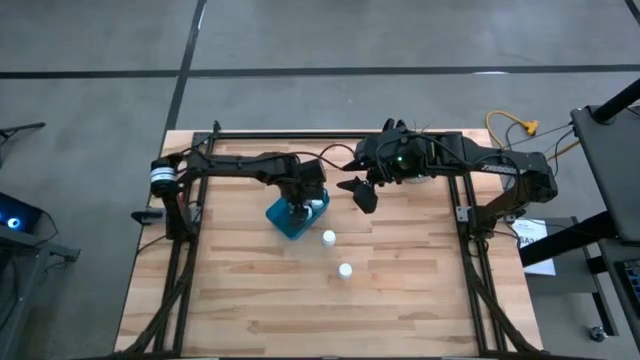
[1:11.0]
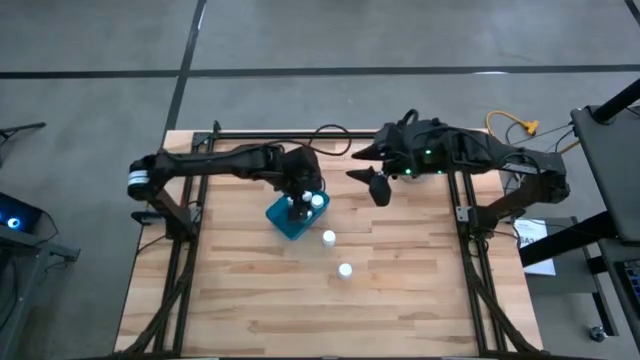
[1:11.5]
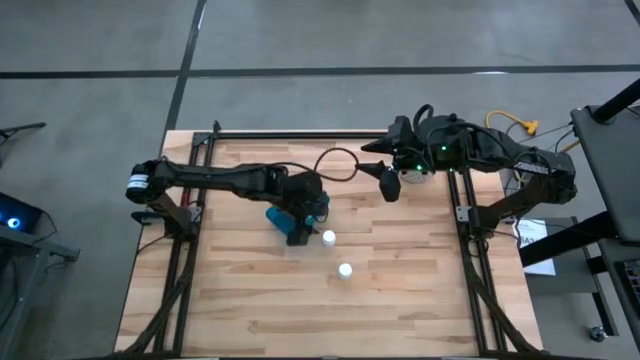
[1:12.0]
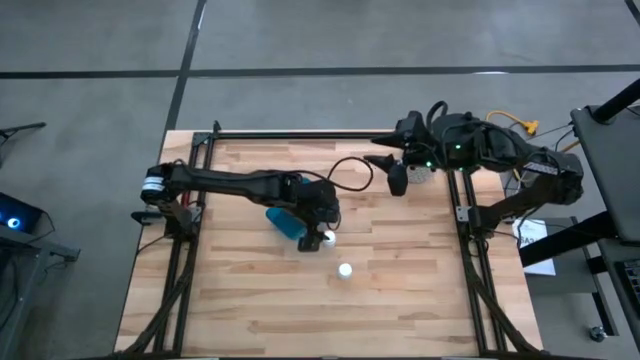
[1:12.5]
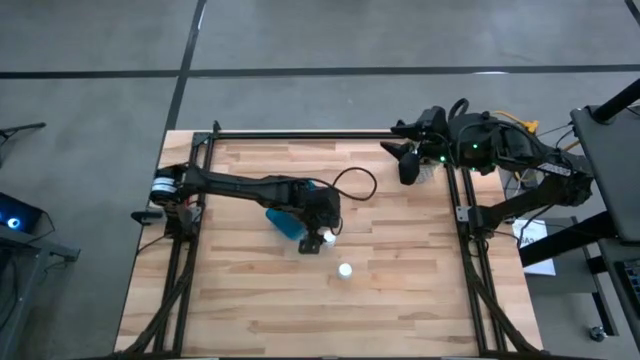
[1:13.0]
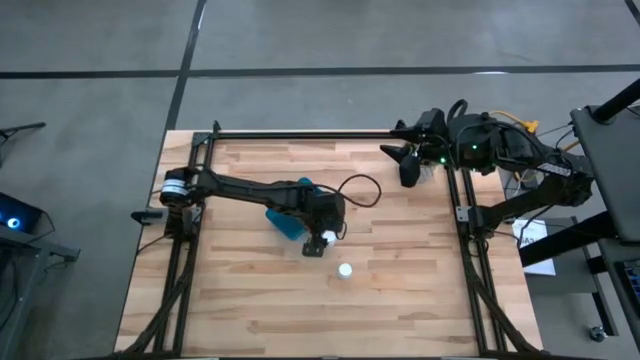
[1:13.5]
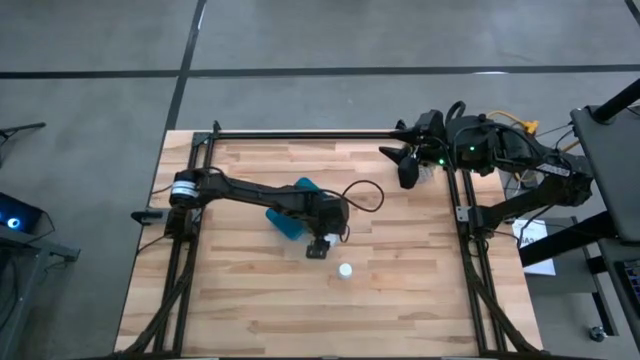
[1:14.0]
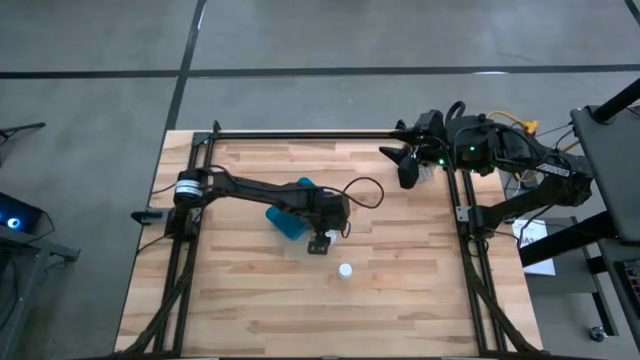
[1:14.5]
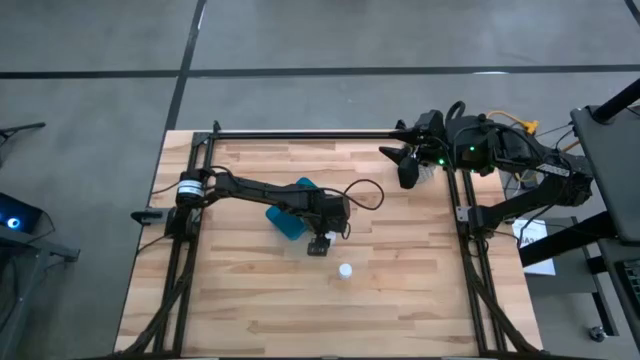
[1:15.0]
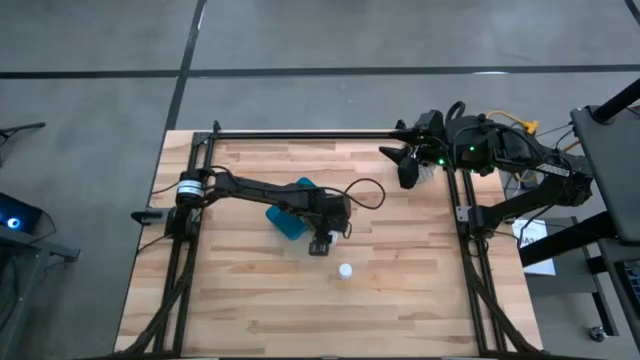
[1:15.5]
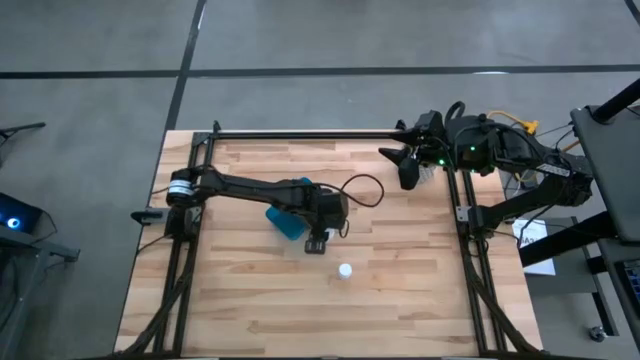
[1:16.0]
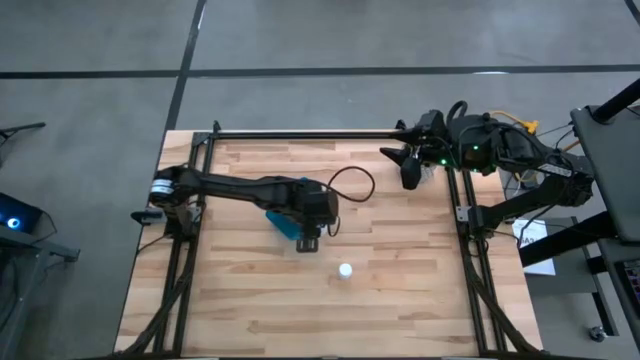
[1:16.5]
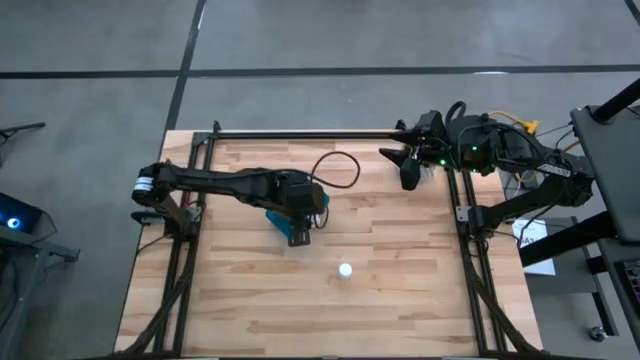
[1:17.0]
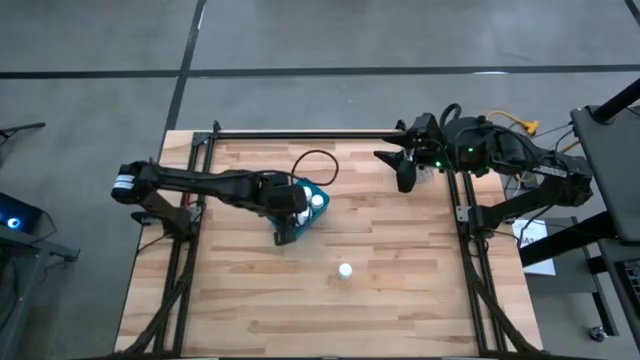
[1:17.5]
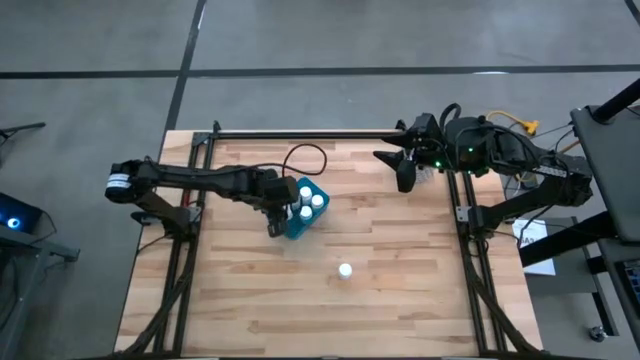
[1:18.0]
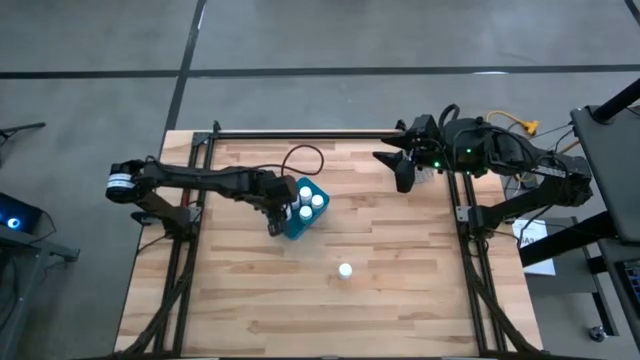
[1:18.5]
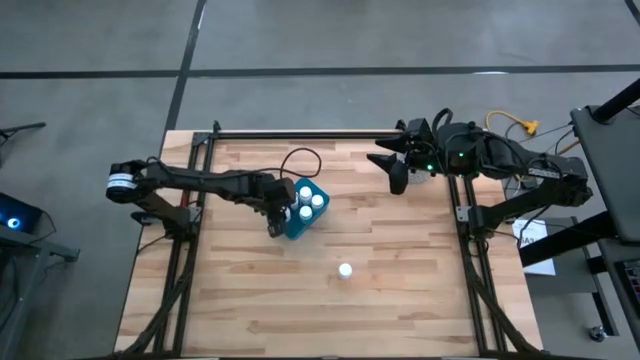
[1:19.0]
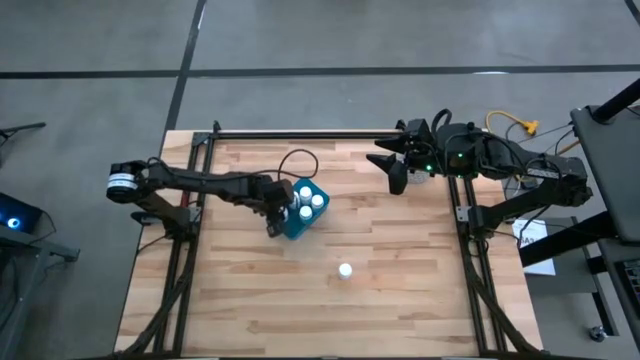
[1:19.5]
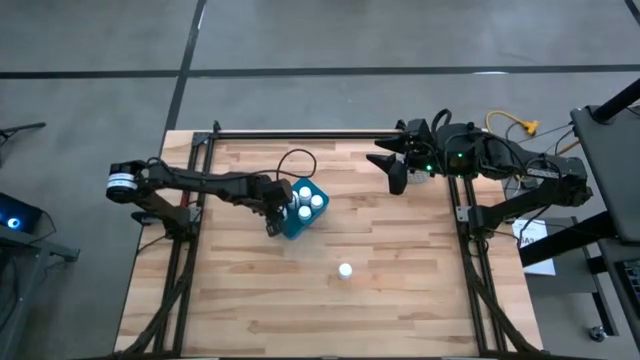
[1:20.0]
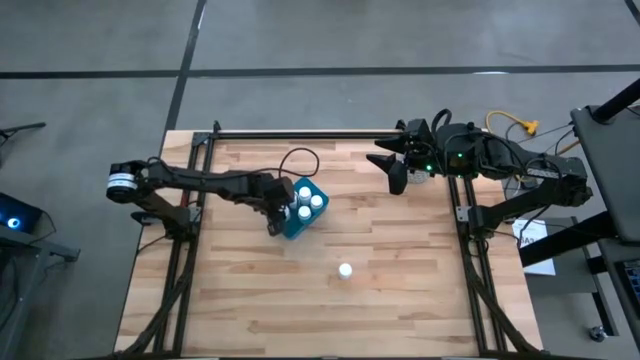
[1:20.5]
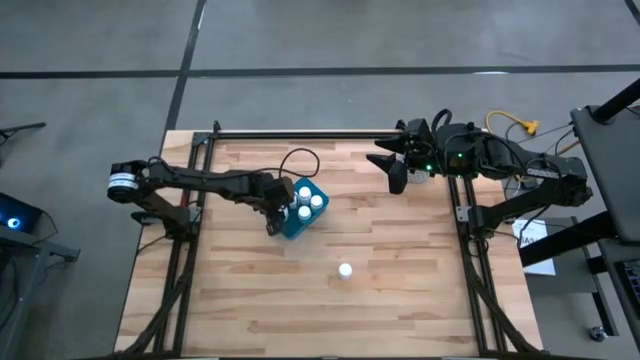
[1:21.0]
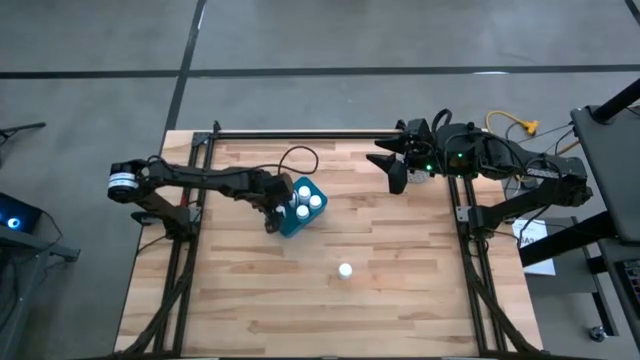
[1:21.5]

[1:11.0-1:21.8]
Task: Pick and place pill bottles into a basket
Put the top white pill bottle into the blue container

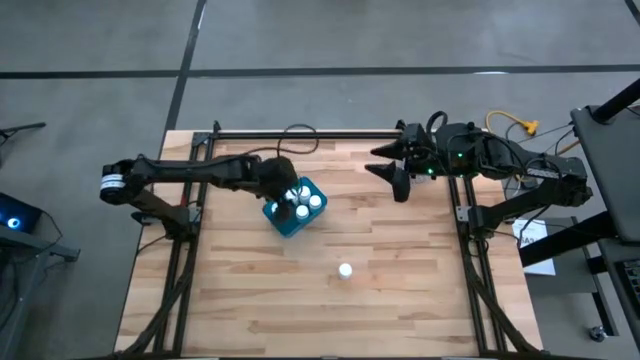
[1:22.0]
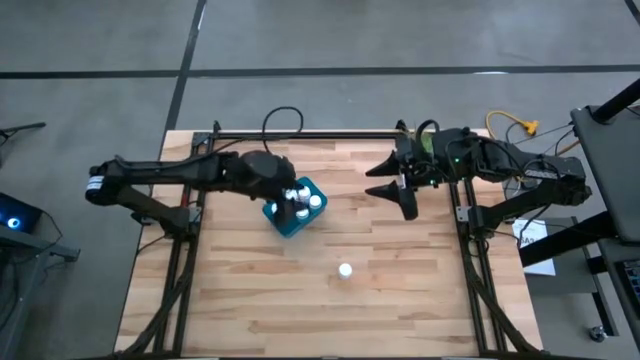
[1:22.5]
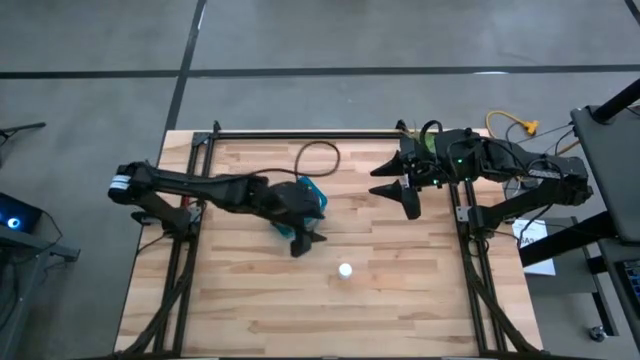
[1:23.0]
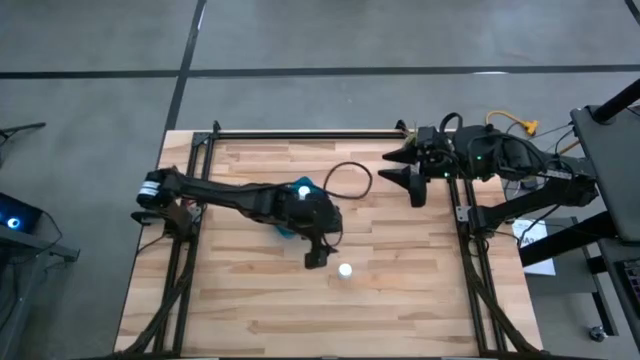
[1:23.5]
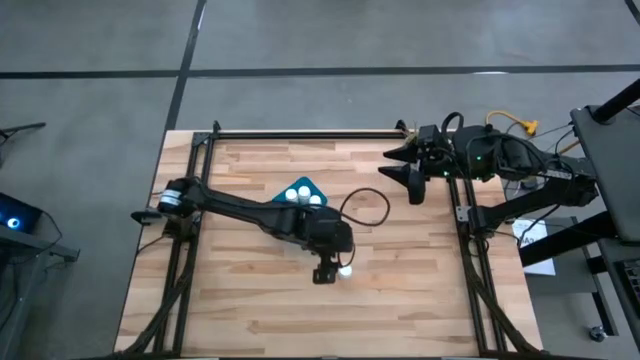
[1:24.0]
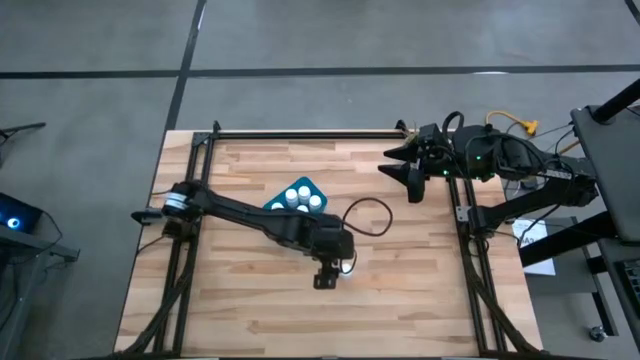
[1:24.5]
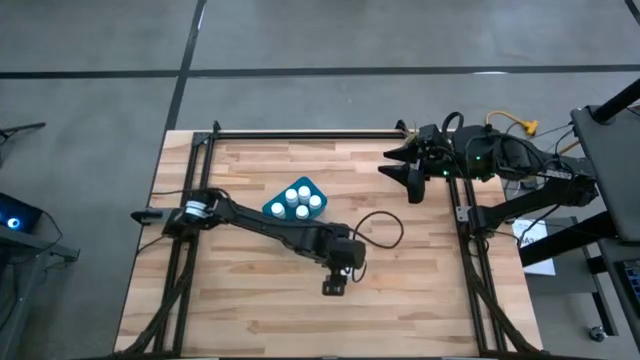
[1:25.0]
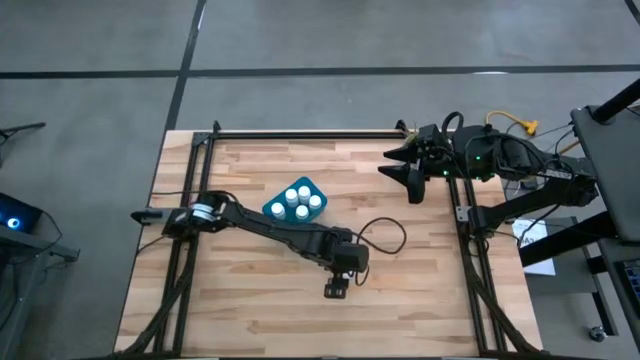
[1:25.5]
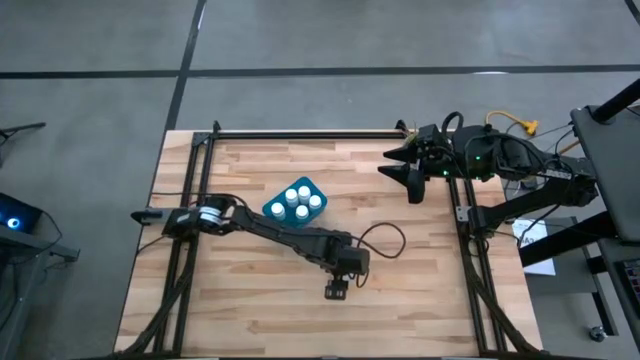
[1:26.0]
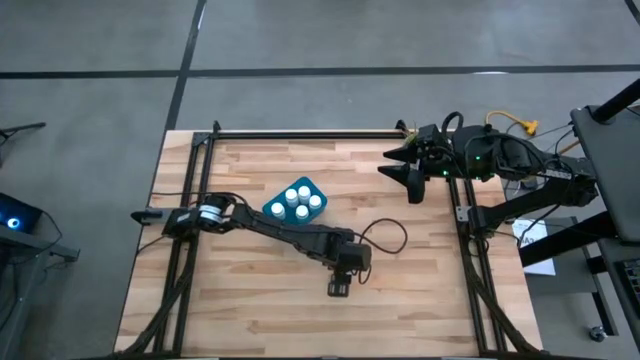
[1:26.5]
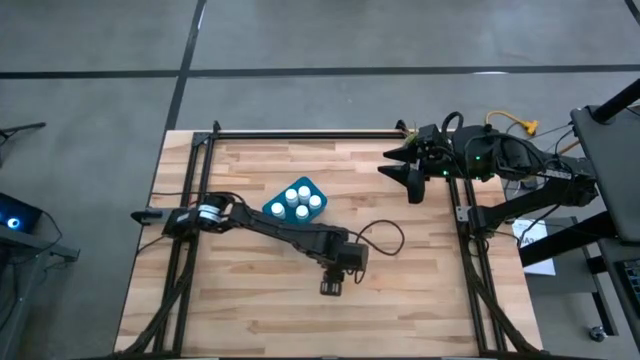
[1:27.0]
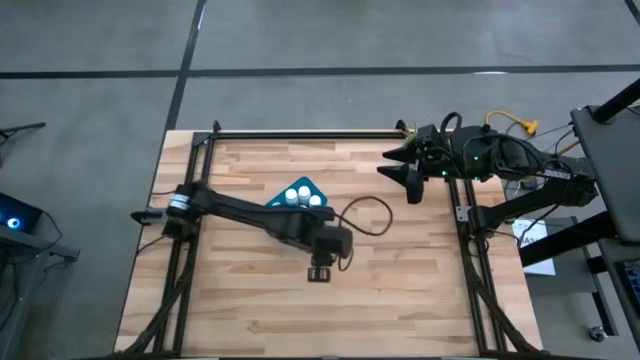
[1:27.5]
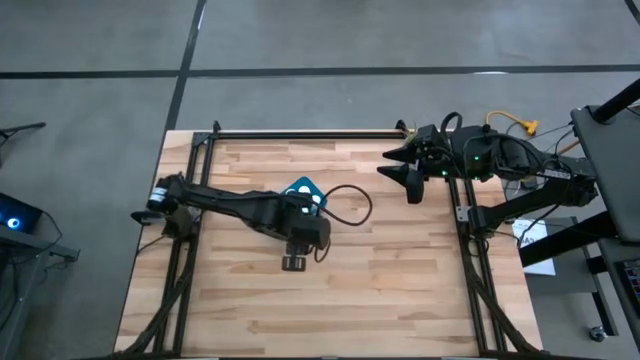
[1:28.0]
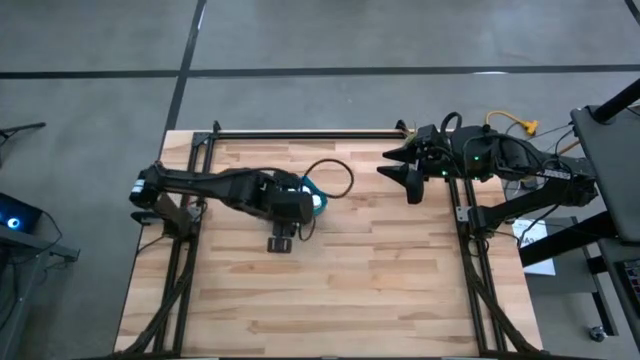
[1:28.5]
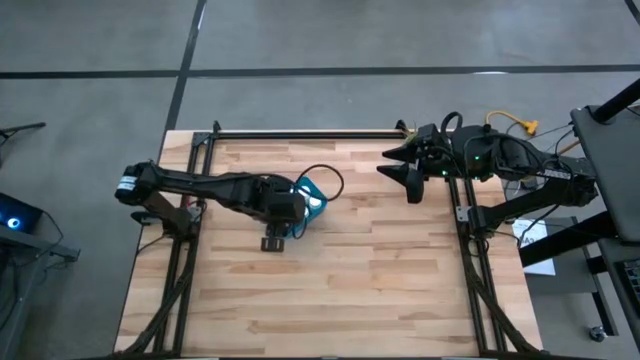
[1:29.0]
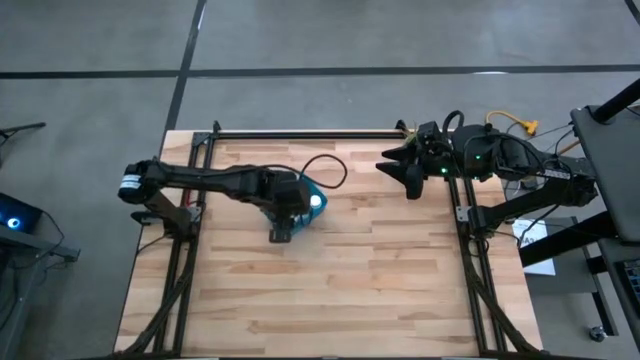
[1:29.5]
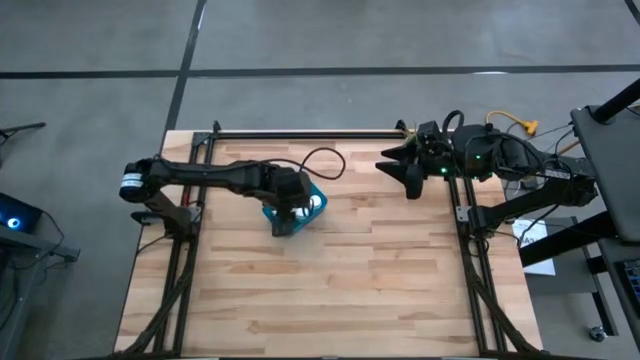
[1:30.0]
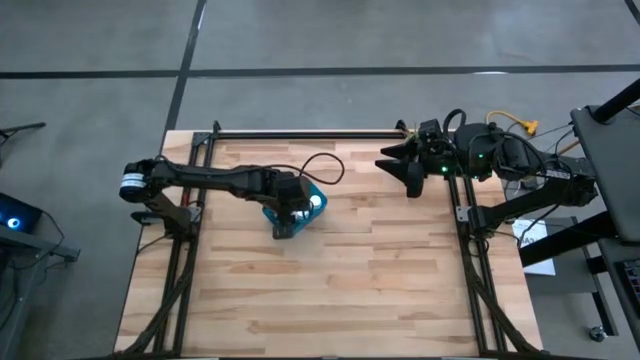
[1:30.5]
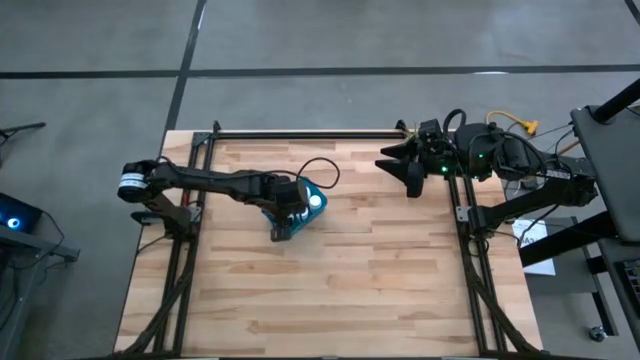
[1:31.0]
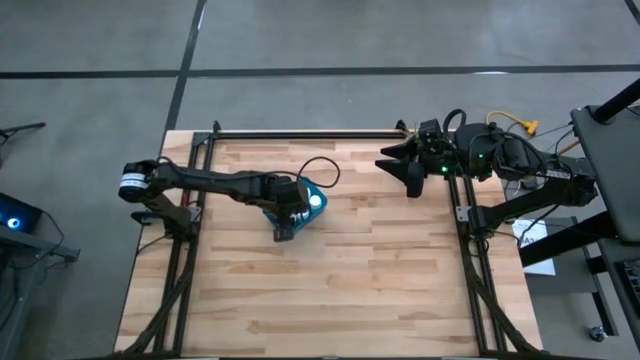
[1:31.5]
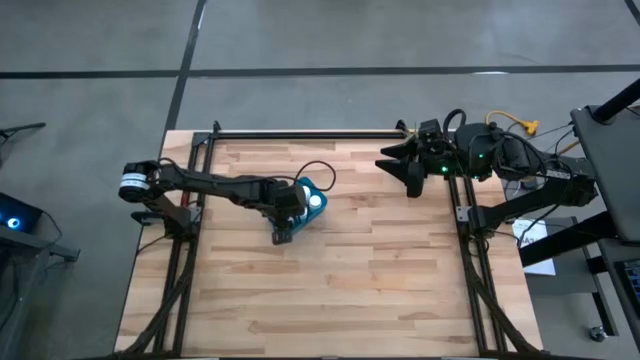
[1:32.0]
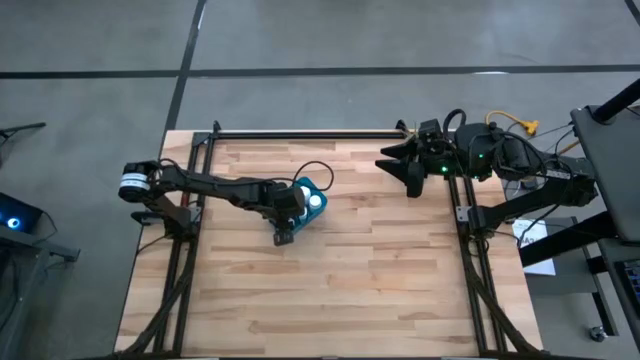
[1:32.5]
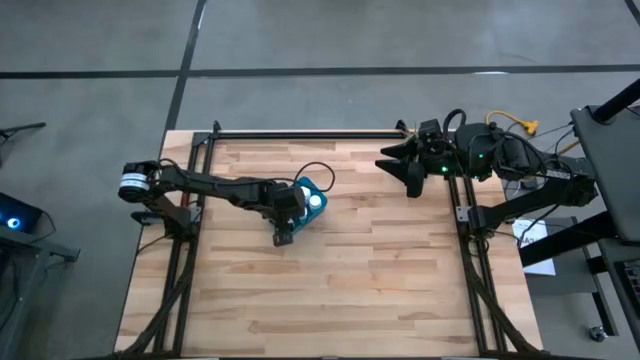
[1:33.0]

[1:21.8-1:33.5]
Put the white pill bottle into the blue container
